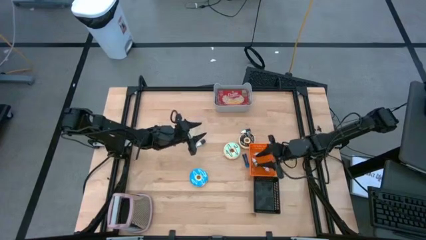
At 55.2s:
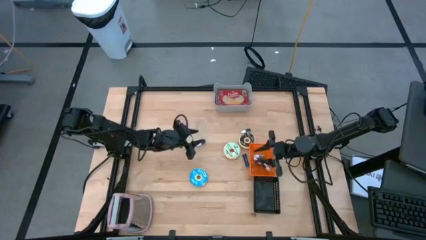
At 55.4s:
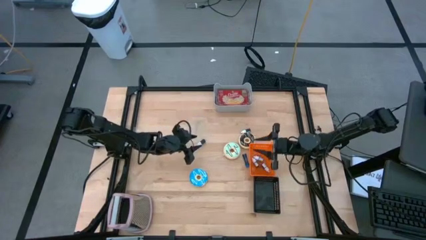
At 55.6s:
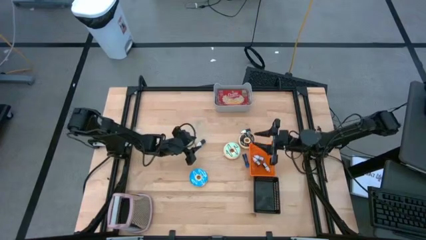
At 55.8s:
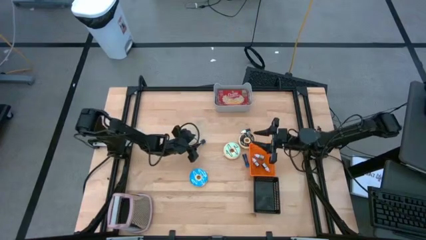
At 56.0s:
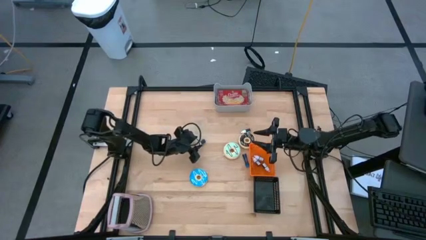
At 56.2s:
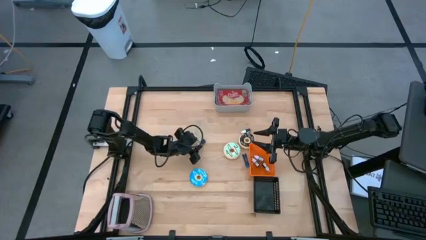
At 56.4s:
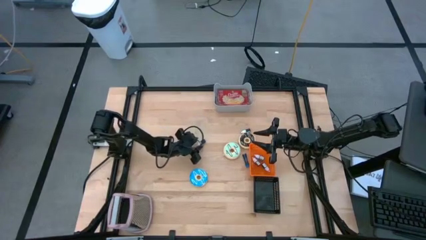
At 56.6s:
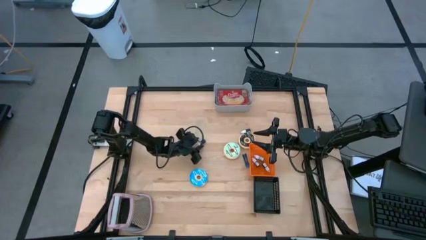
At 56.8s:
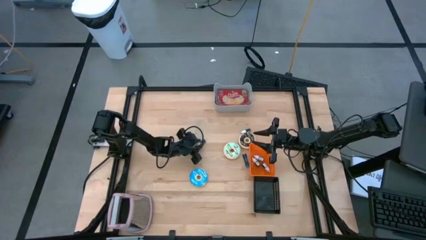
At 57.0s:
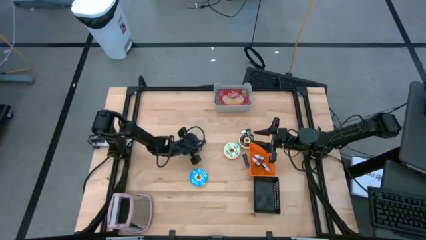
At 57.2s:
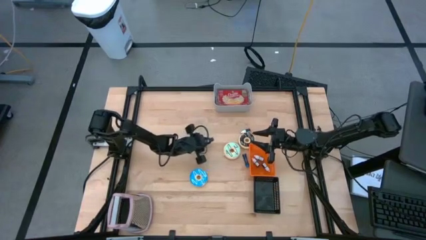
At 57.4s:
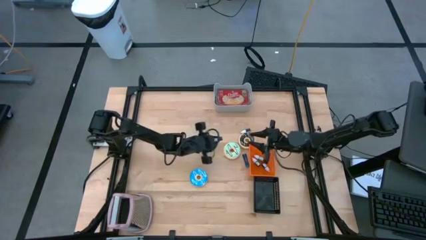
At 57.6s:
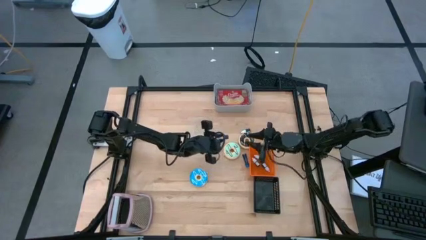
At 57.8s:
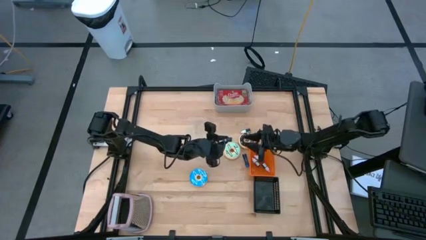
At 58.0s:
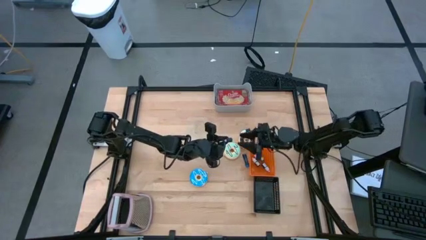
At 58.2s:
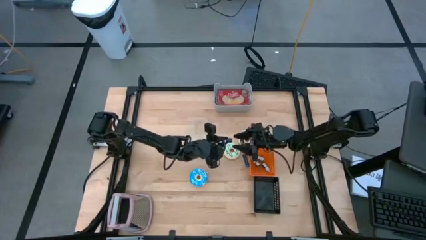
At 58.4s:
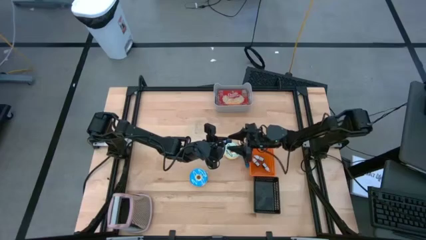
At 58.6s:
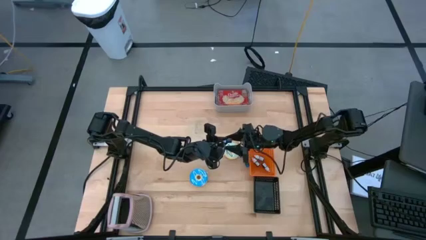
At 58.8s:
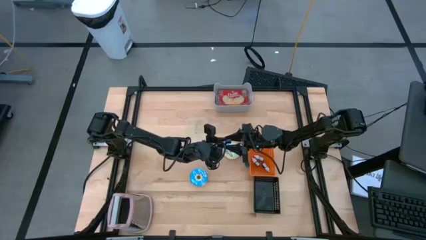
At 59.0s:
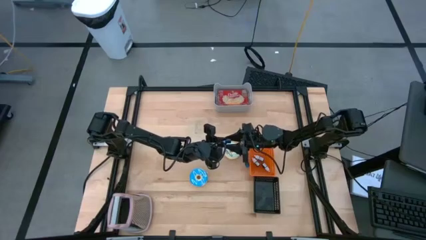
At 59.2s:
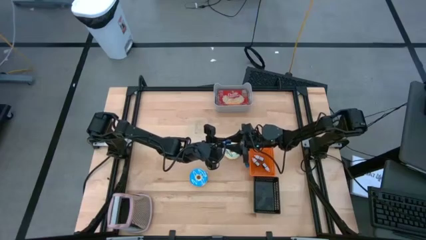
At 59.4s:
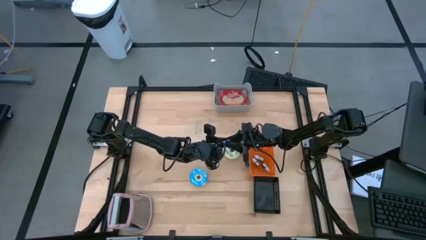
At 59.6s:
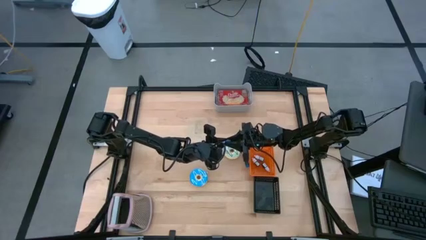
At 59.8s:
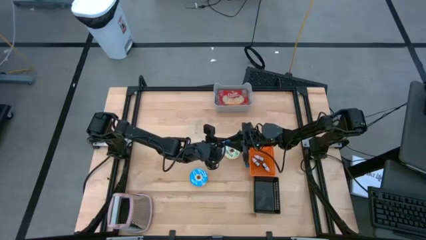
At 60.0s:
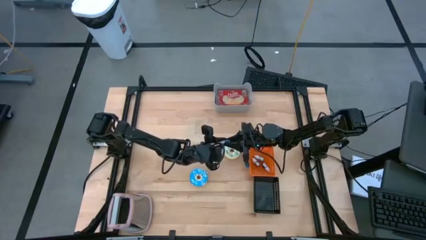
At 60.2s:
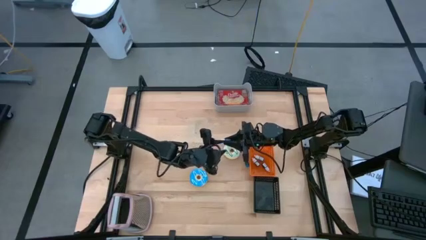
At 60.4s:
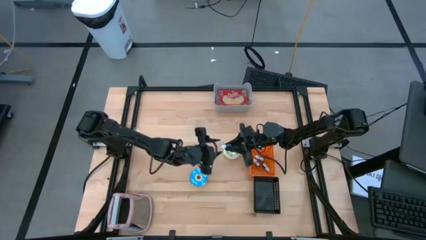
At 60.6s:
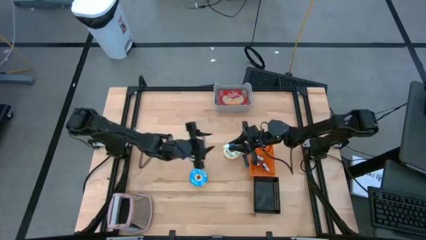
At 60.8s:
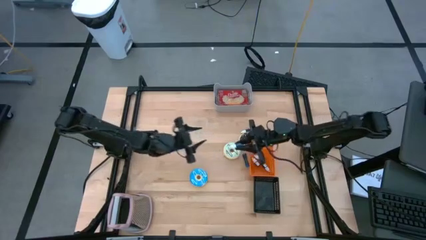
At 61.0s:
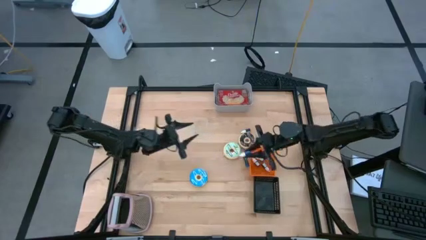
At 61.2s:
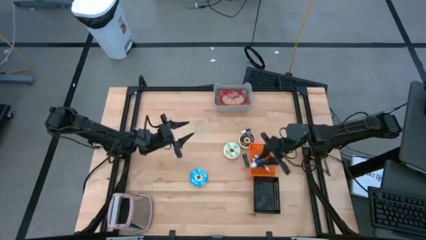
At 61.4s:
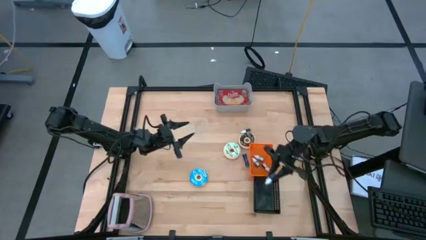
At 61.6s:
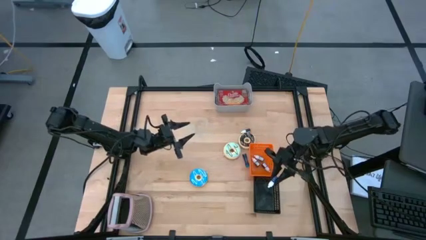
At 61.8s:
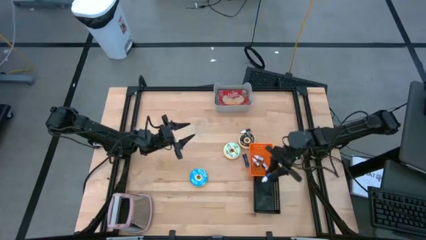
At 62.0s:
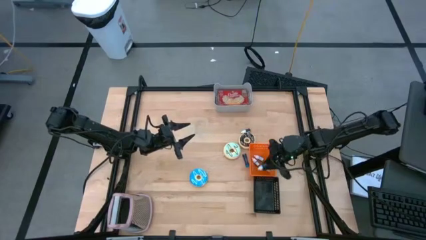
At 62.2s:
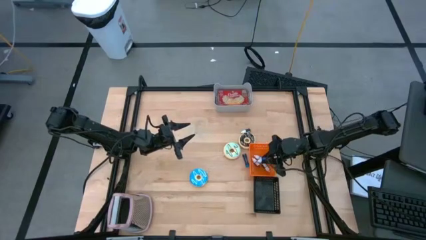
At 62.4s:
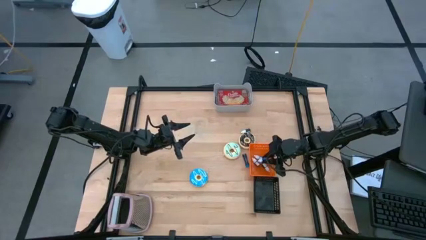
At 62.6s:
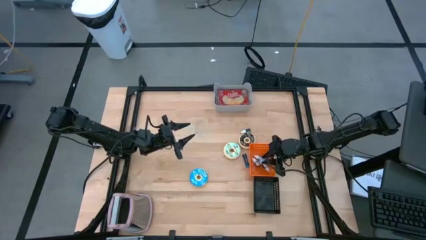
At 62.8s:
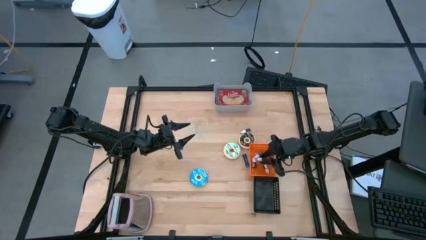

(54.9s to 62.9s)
Put the dark blue food coloring bottle into the orange bin

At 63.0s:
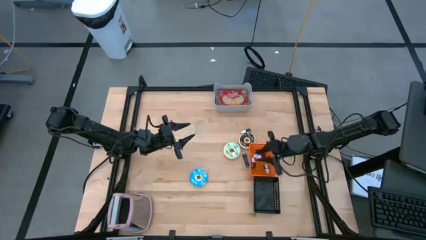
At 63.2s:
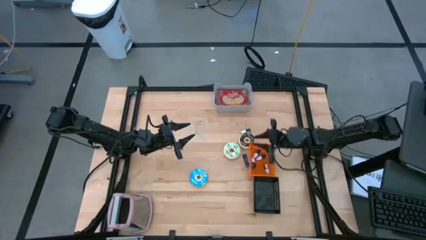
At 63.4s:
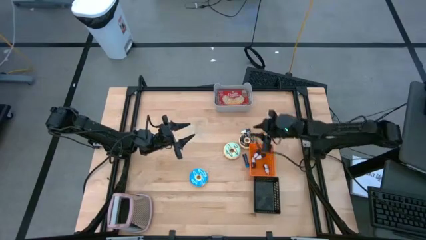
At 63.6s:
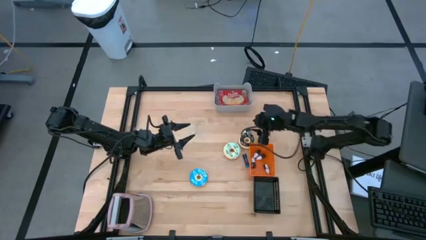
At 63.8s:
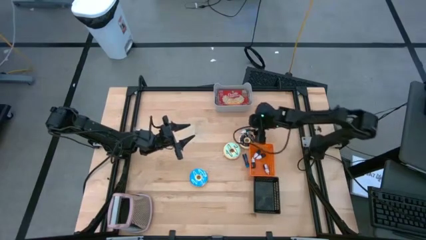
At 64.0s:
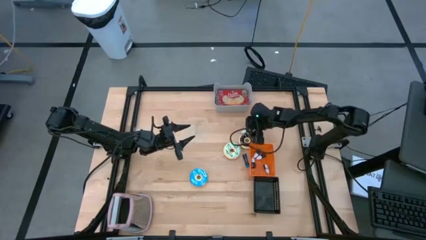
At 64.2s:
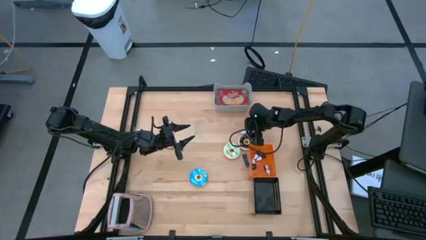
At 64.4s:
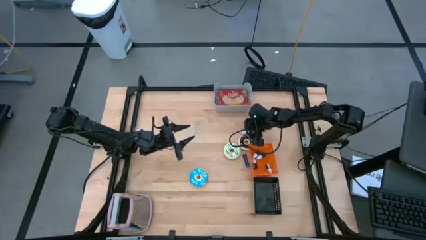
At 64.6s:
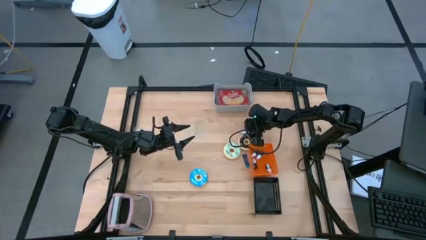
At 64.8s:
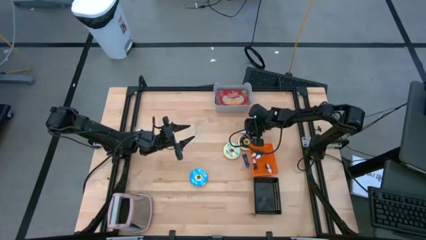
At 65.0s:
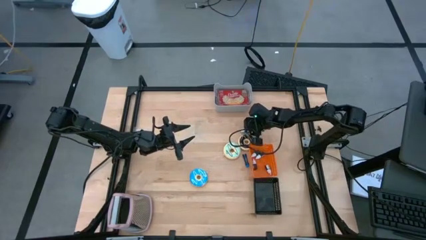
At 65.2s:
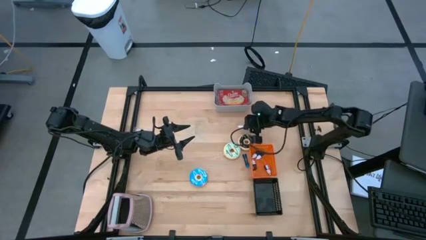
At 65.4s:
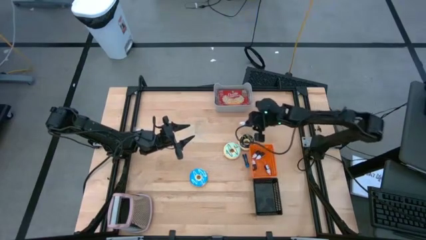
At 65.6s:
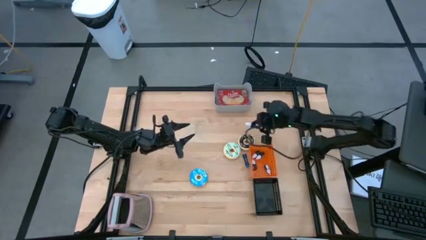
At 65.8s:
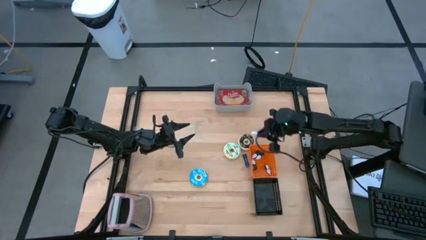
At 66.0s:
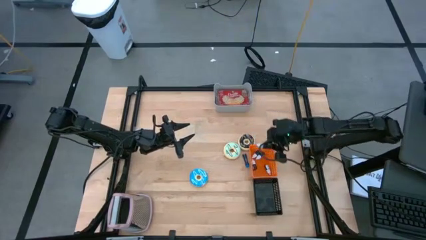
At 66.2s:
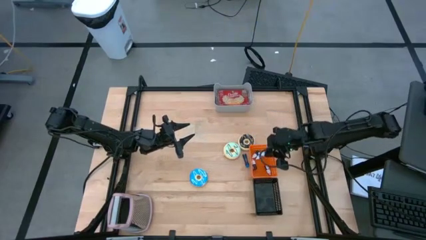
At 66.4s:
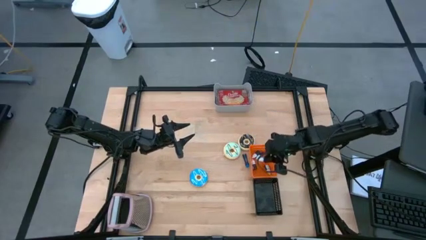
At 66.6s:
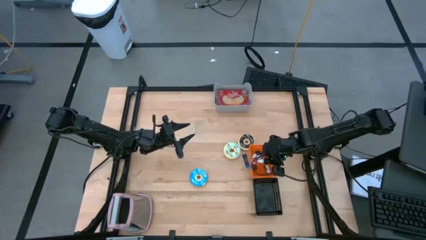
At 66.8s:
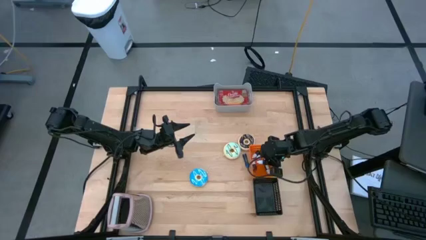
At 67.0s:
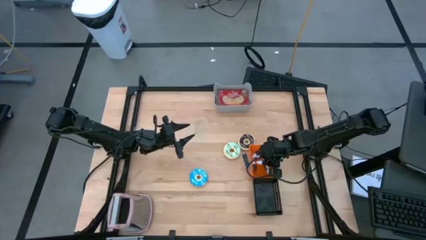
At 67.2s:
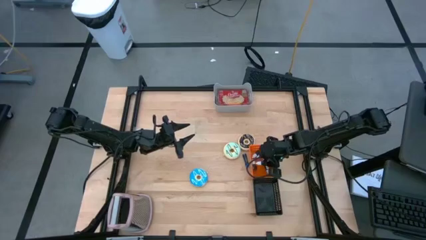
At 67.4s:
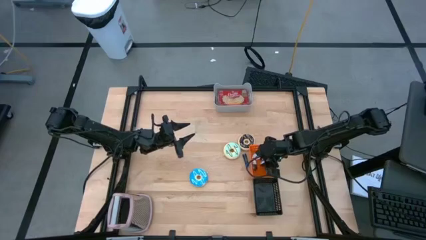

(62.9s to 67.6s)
Put the black food coloring bottle into the orange bin

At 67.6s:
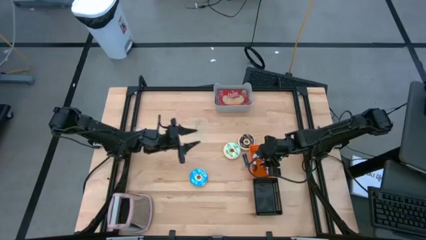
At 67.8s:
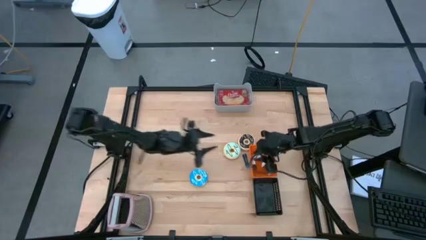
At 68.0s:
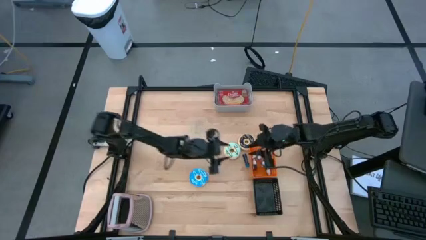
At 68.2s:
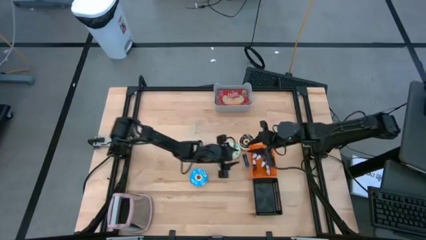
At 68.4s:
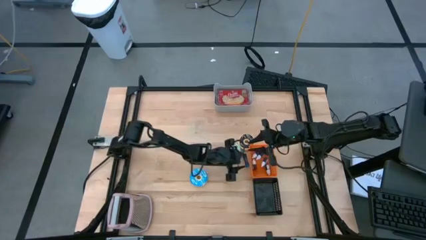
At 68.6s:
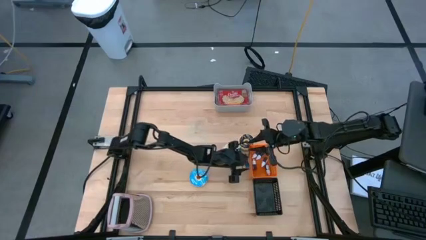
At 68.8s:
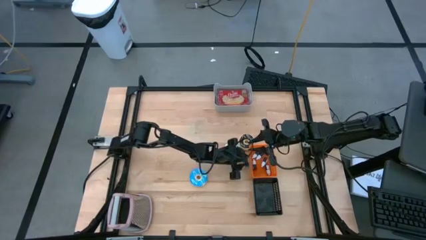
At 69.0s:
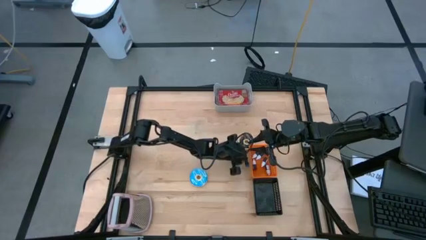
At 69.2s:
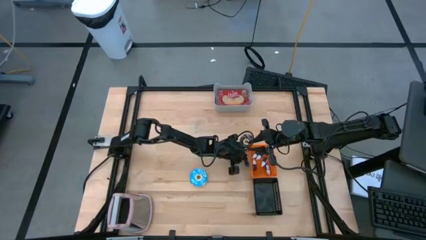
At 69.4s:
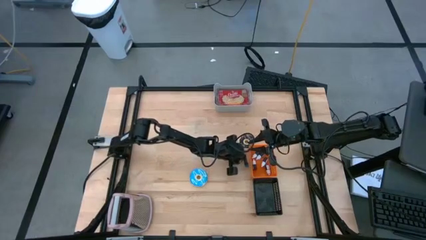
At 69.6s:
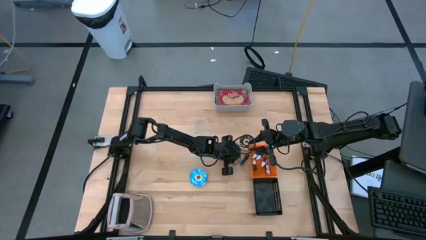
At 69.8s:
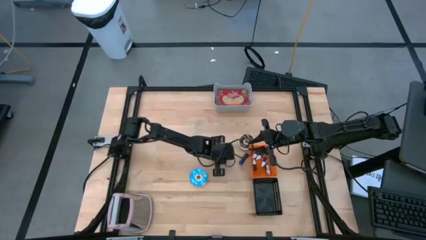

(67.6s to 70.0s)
Put the blue large food coloring bottle into the orange bin

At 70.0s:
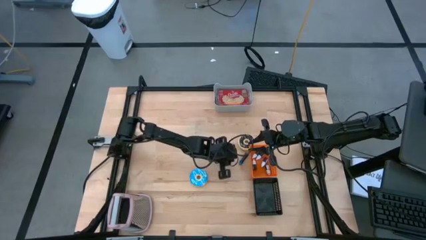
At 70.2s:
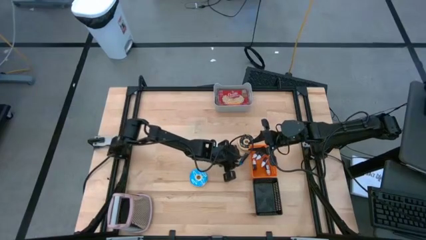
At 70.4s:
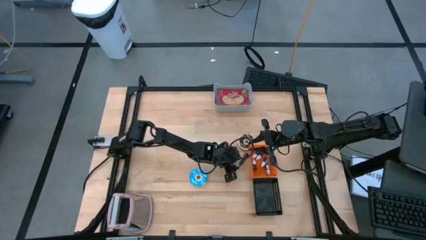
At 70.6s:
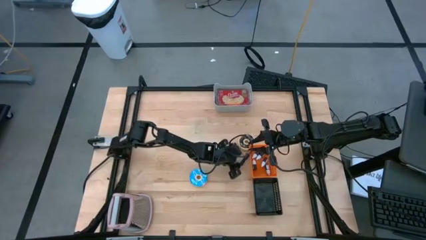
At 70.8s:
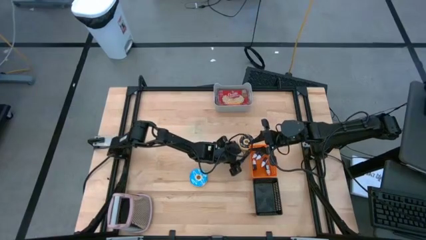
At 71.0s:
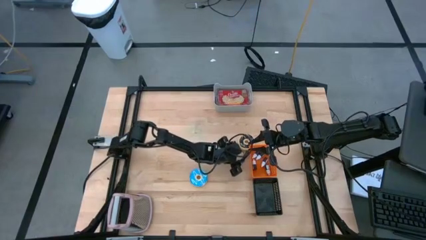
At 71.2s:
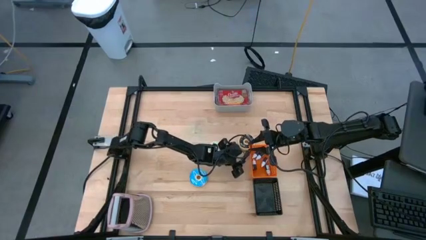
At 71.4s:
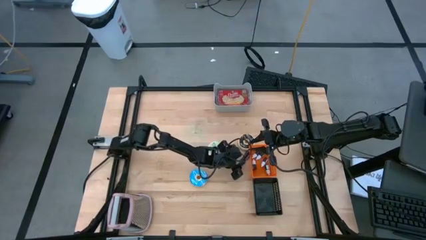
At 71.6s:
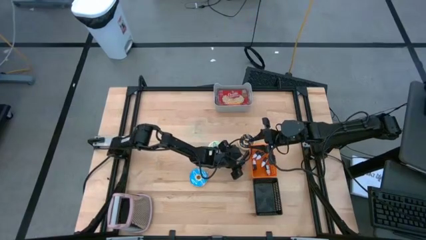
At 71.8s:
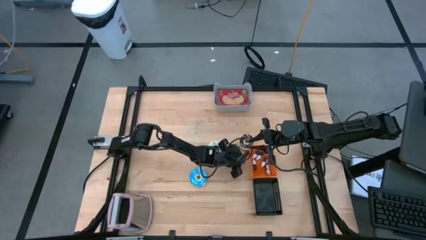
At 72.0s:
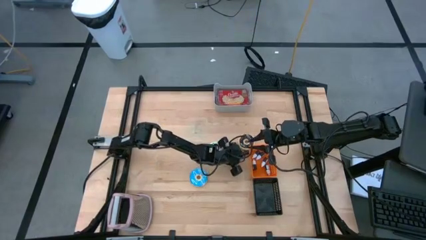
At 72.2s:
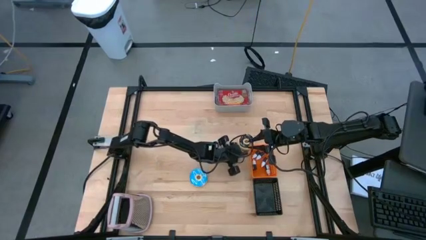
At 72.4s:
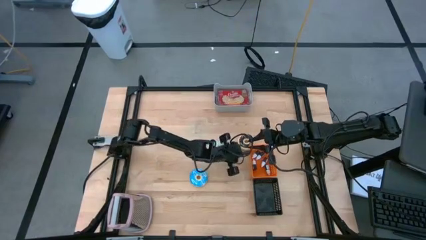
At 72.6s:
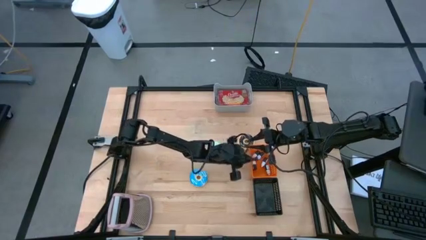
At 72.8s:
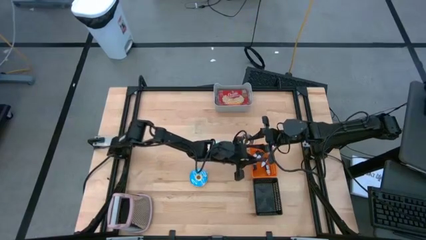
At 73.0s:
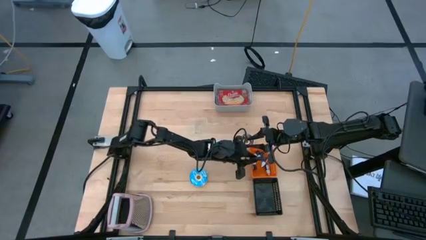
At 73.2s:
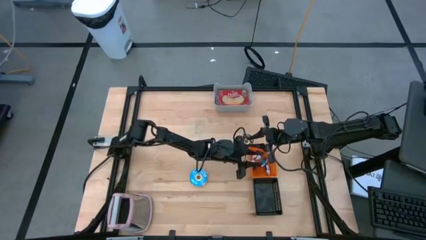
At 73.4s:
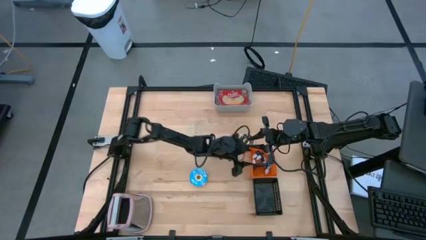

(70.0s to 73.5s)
Put the blue large food coloring bottle into the orange bin
